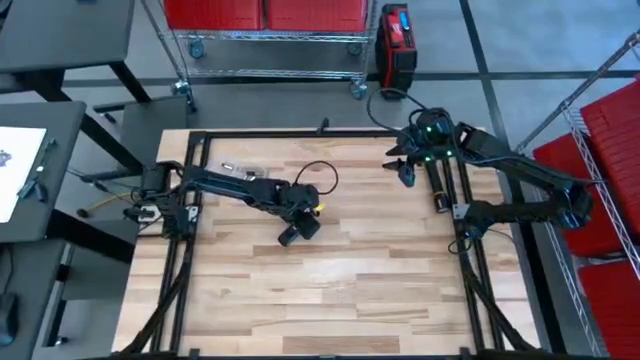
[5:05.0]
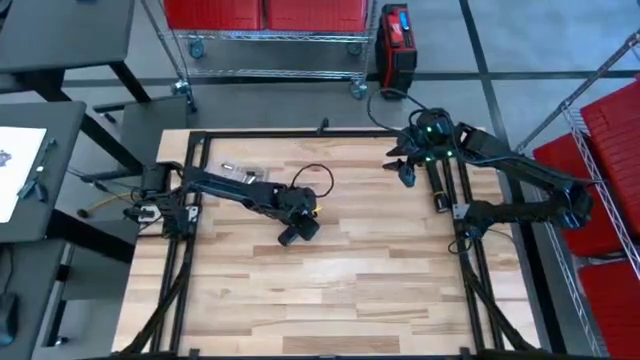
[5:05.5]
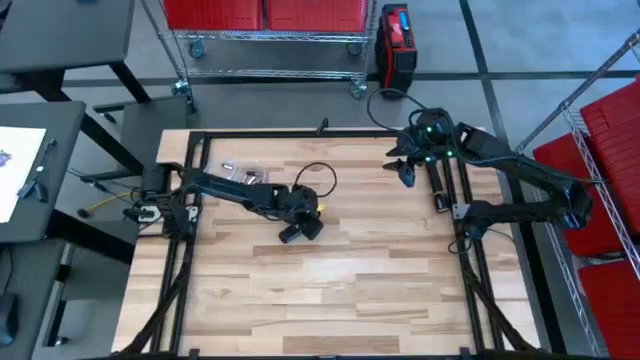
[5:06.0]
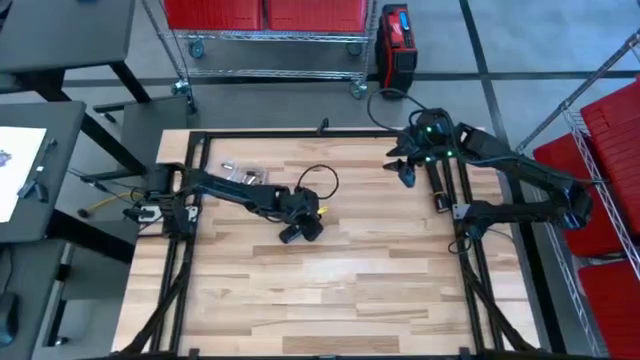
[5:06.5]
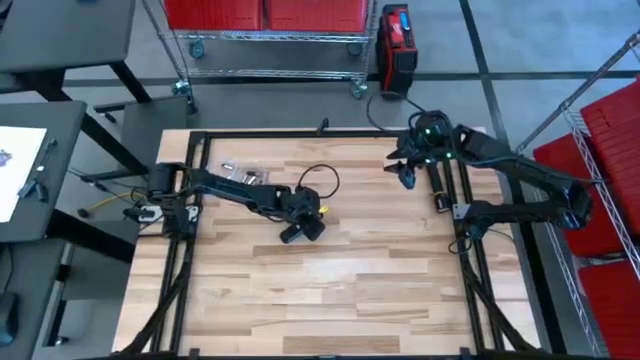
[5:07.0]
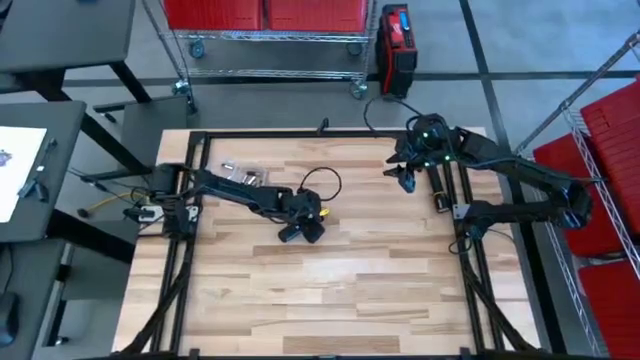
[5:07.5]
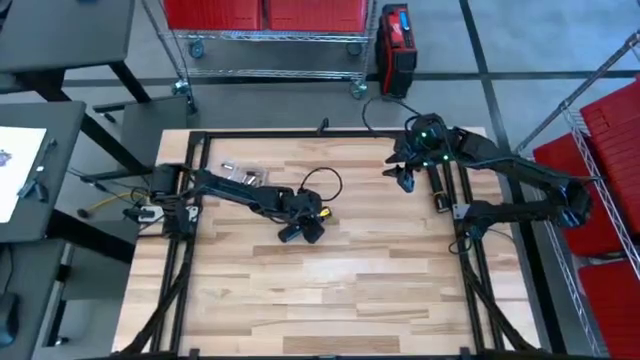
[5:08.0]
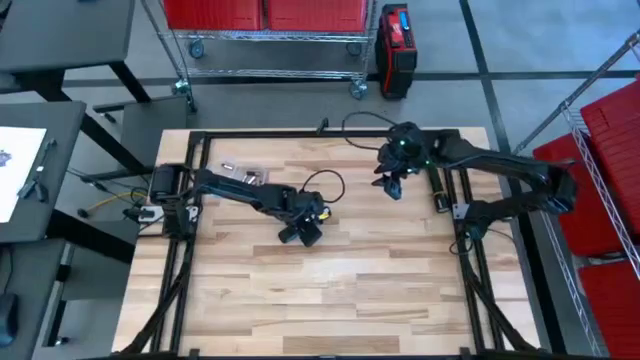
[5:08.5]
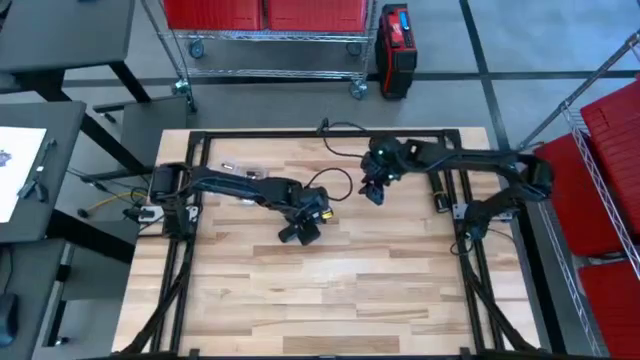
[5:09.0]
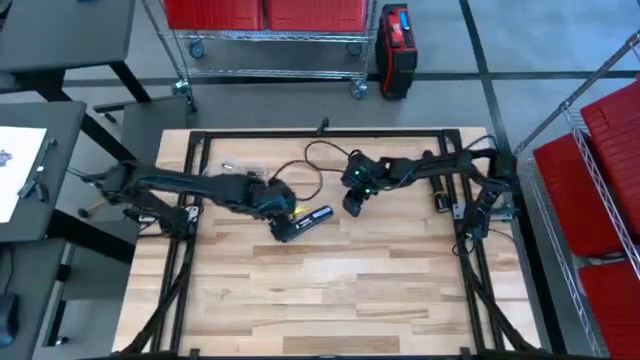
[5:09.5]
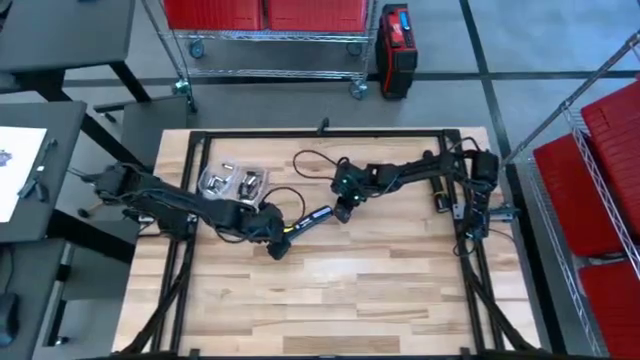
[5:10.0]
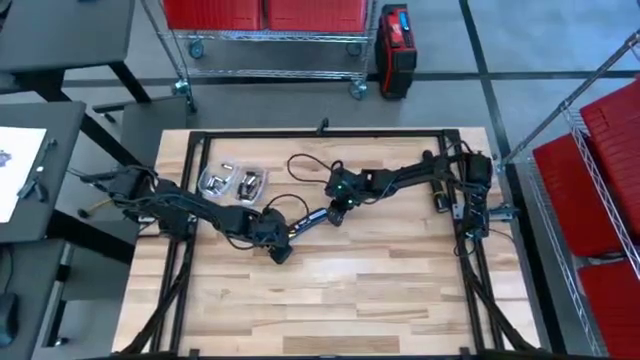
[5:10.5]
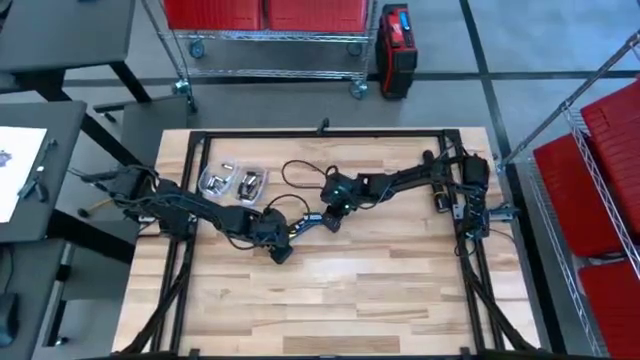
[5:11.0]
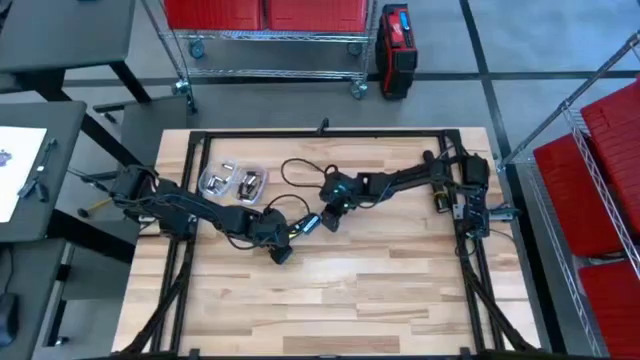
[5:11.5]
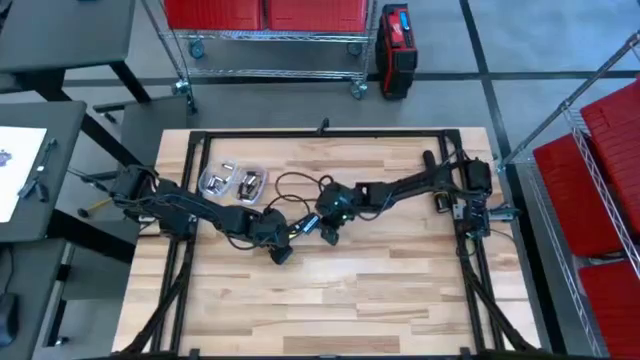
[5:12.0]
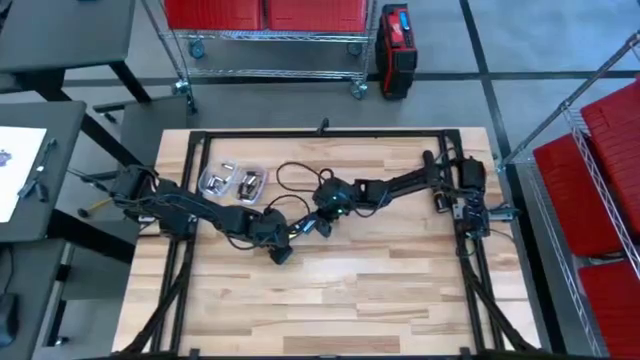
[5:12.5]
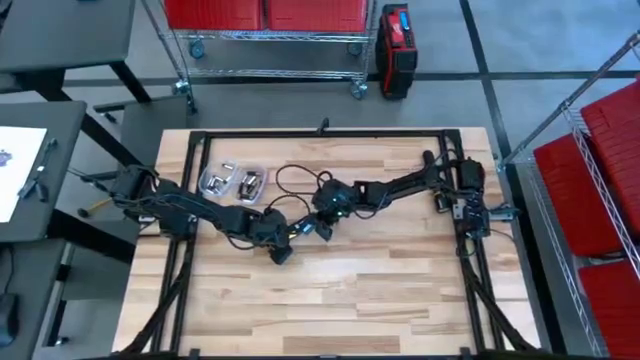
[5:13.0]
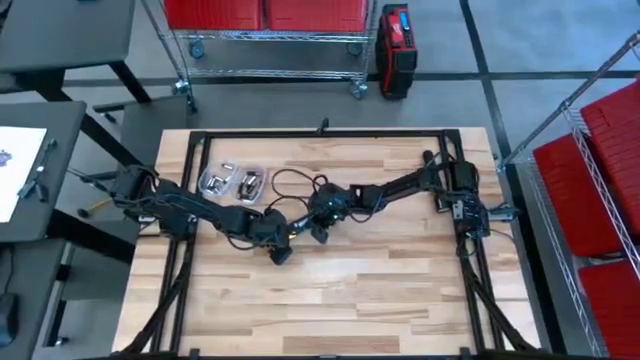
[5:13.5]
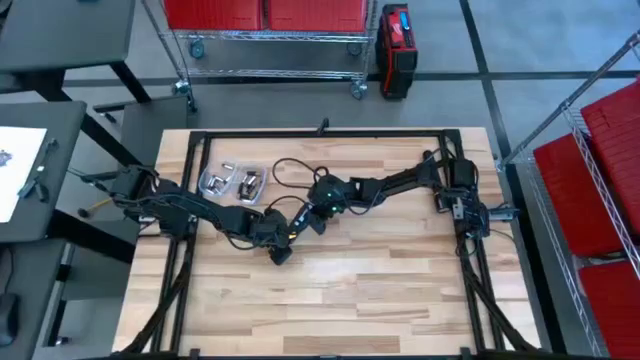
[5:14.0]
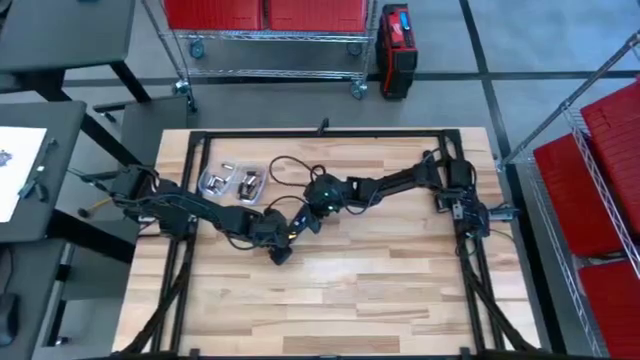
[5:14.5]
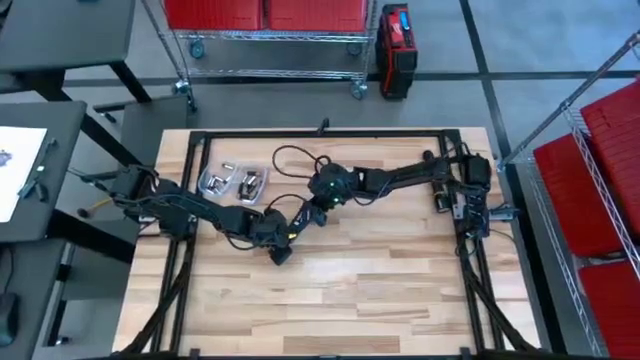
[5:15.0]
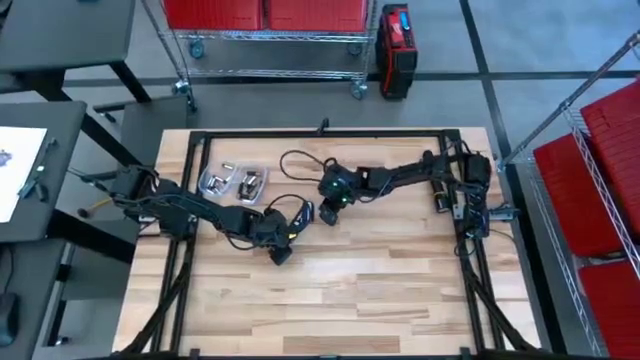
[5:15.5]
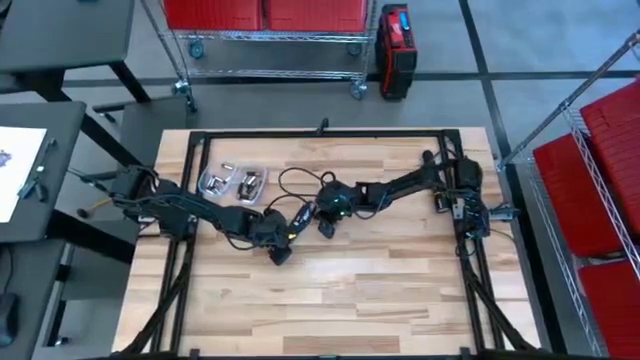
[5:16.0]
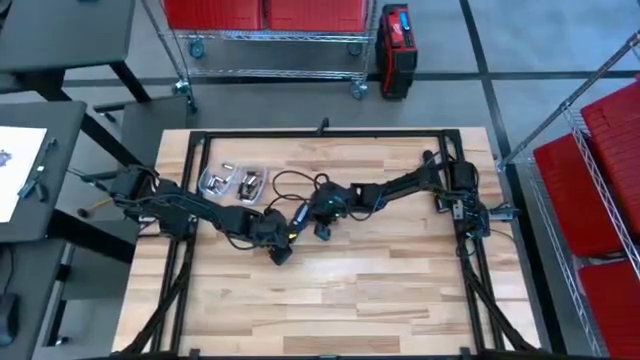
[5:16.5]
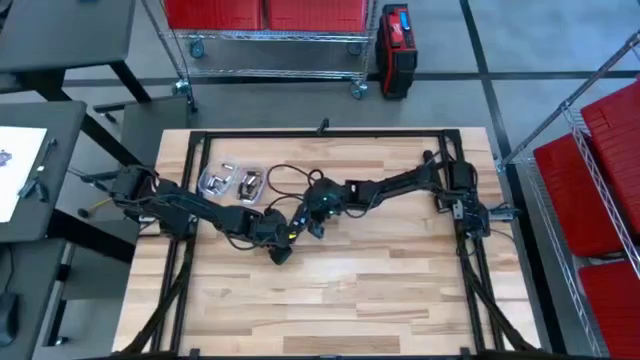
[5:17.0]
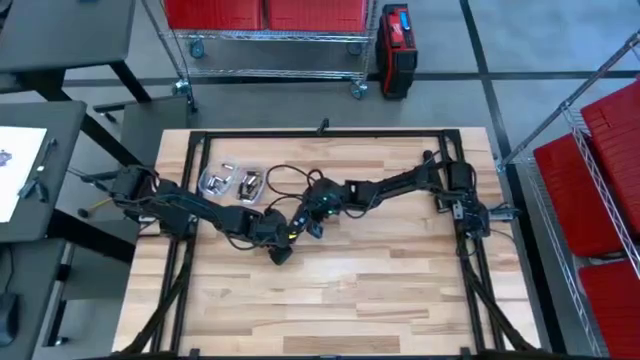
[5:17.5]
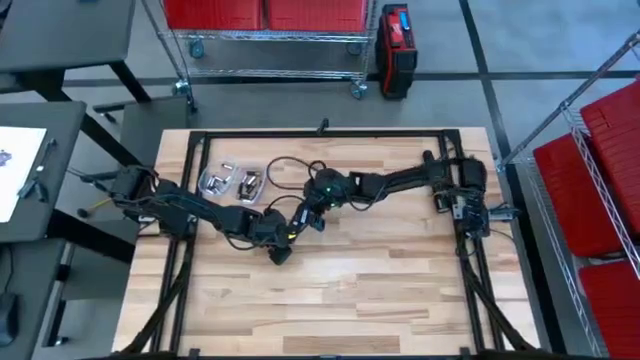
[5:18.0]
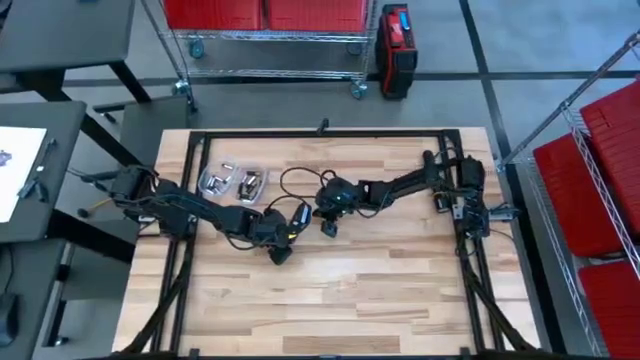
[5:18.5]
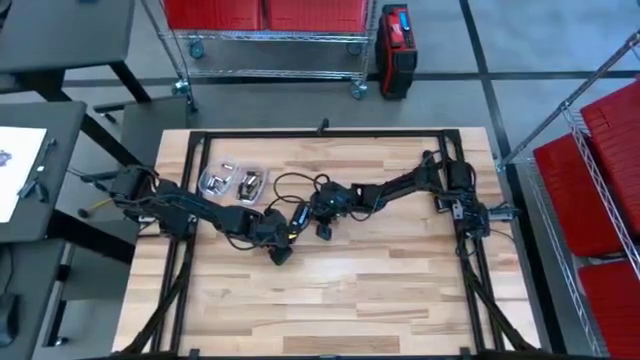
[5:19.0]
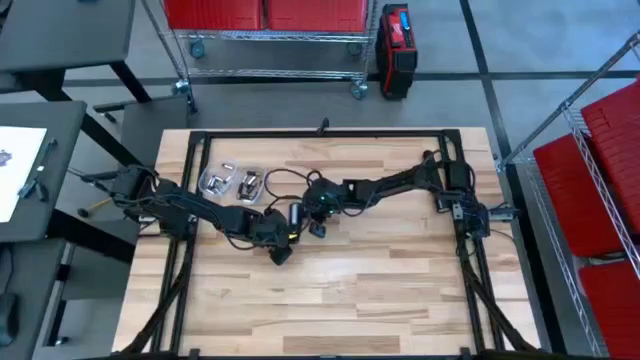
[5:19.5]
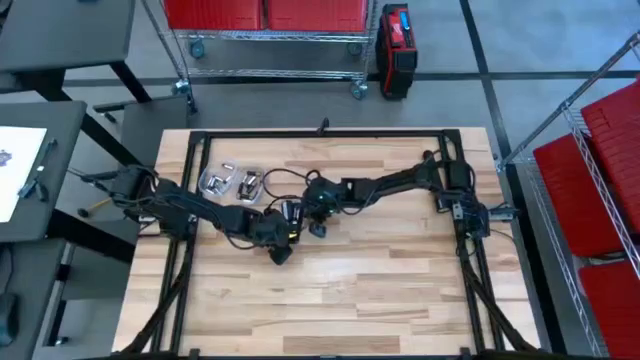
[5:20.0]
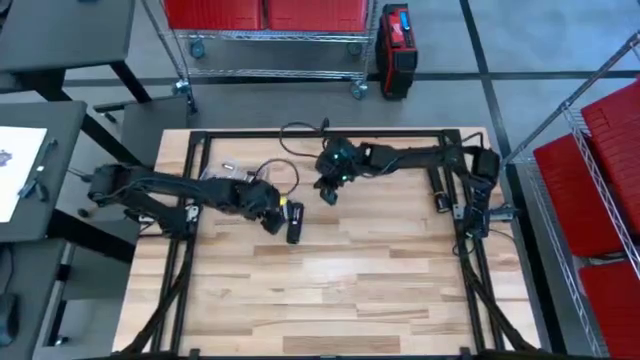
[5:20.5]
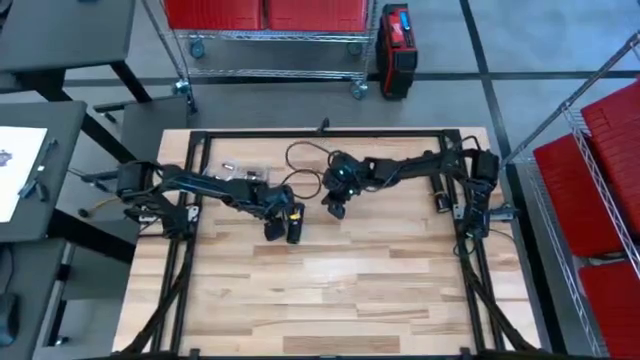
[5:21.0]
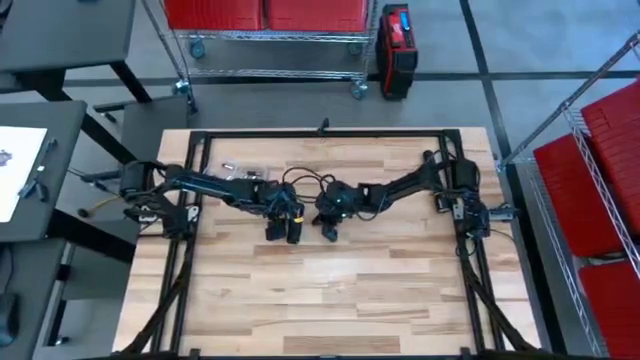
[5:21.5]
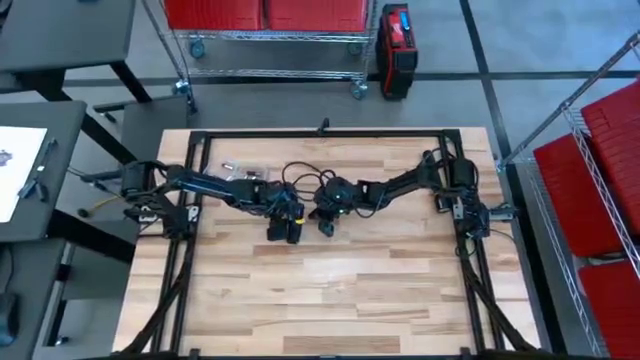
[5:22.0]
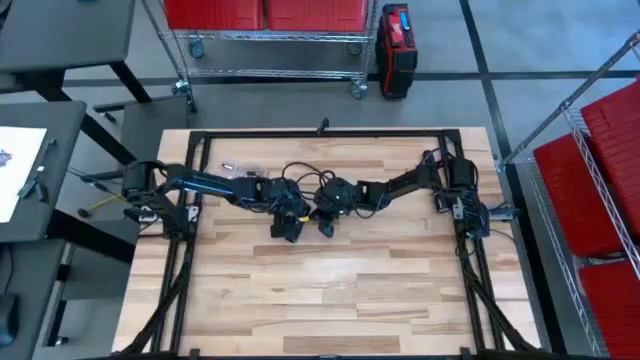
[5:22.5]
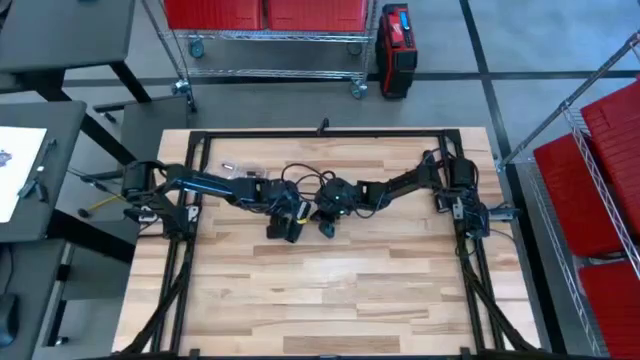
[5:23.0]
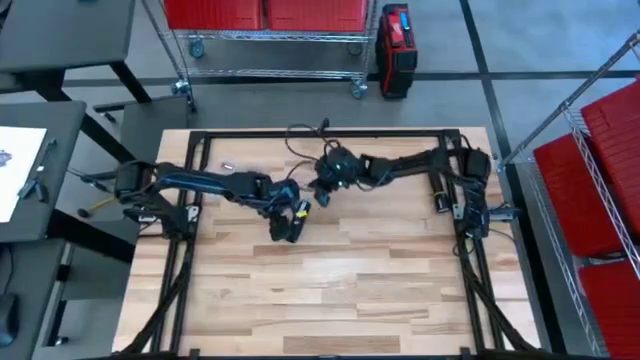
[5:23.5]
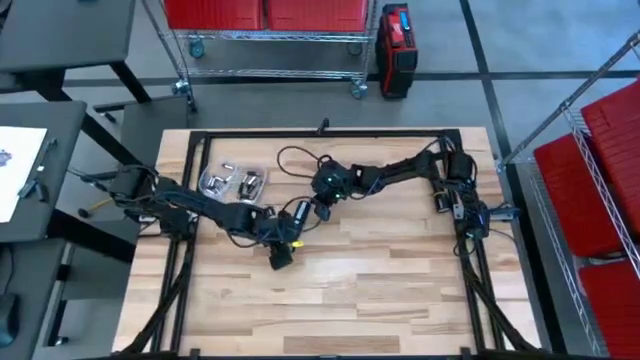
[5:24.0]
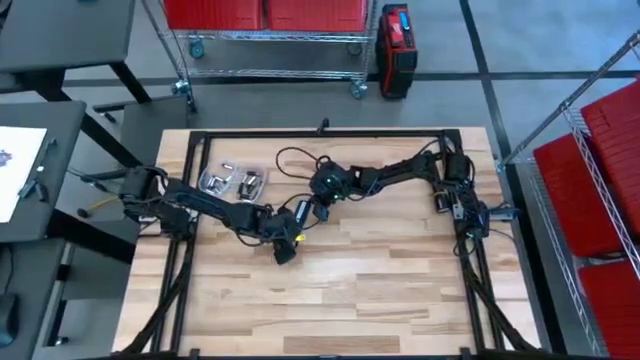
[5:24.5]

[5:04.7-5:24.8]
Task: Insert battery
Close the remote's battery compartment

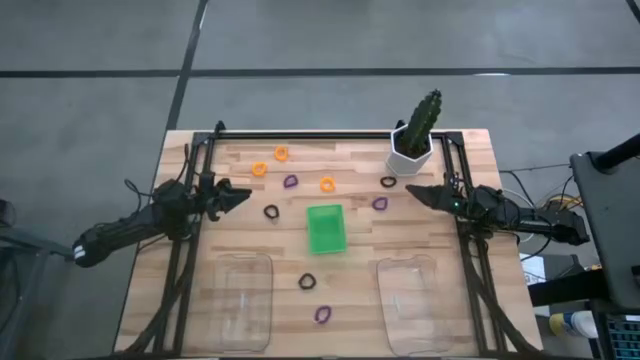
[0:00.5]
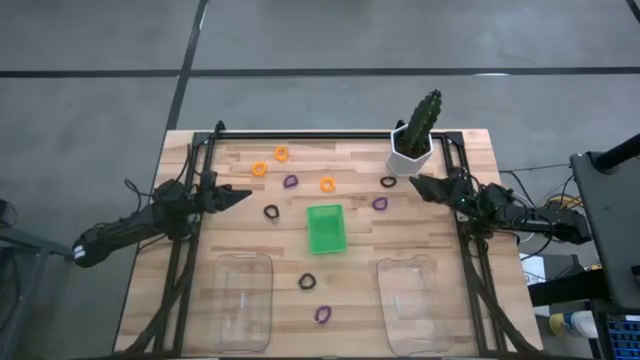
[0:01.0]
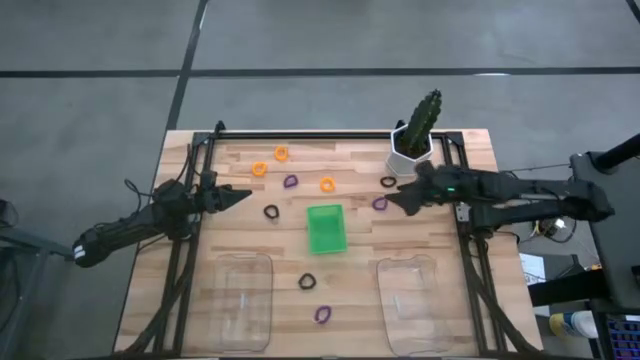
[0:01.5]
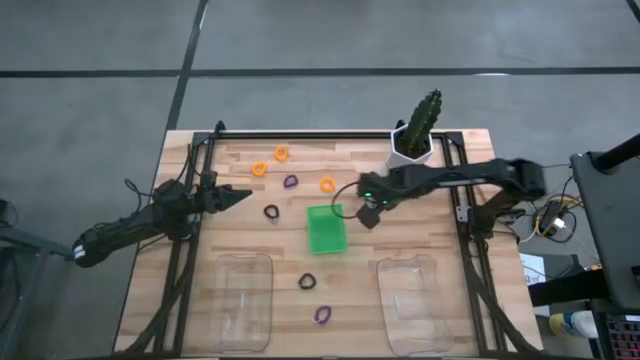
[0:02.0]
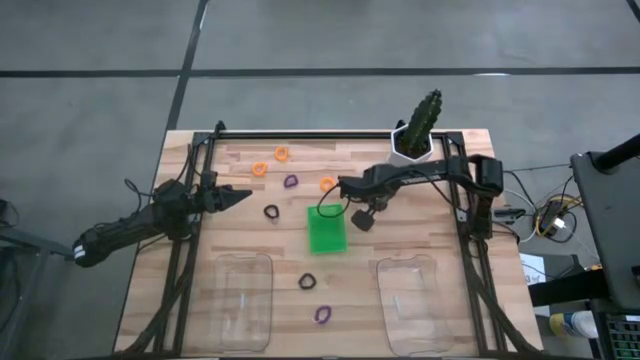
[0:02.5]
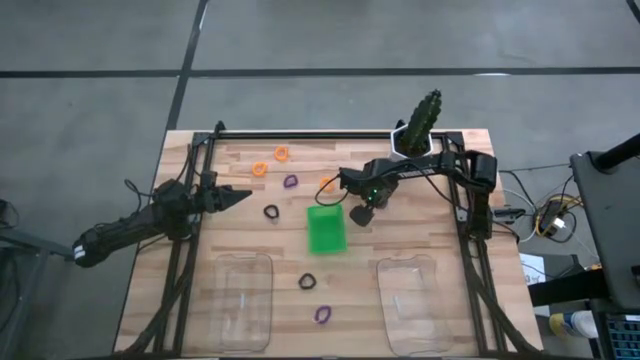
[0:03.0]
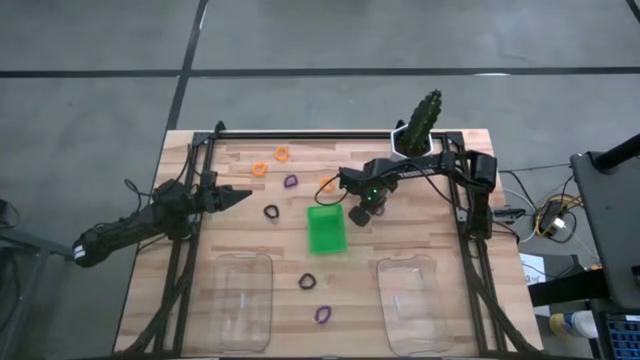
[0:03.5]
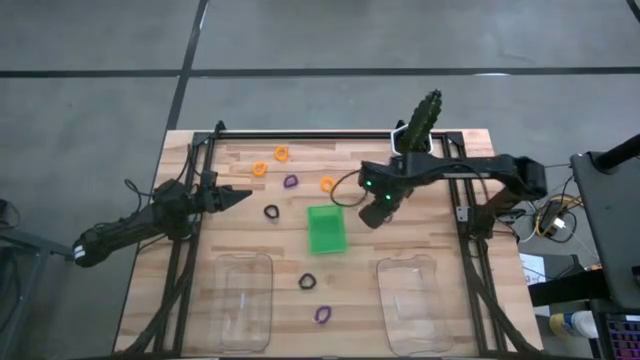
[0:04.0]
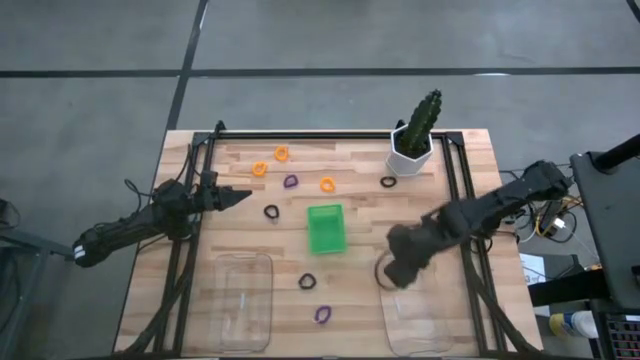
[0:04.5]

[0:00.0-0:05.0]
Task: Sort spring keychains
Put the middle purple spring keychain into the right transparent bin
